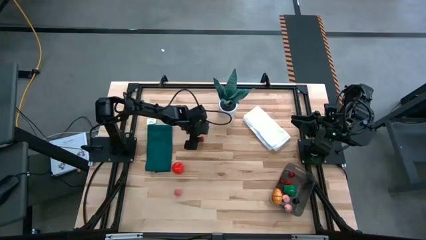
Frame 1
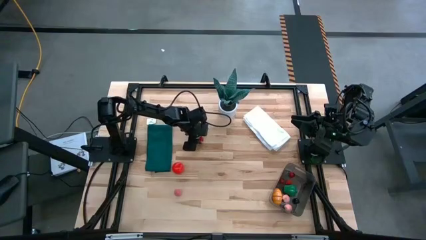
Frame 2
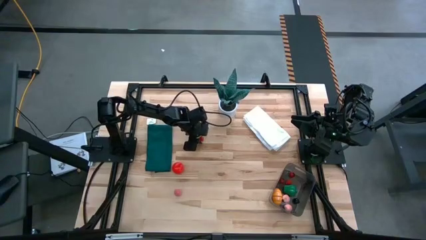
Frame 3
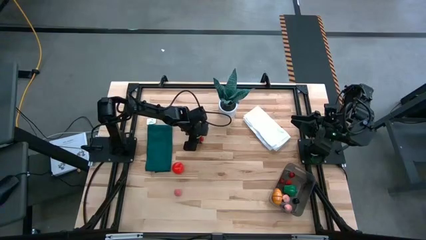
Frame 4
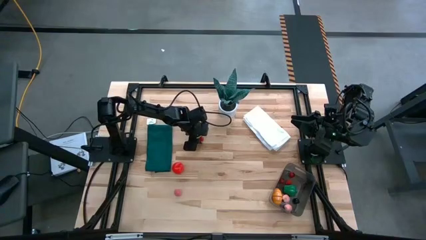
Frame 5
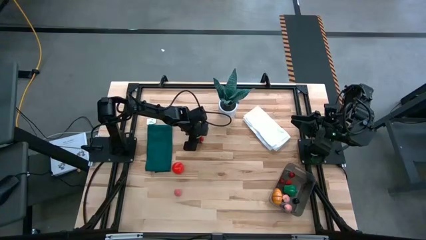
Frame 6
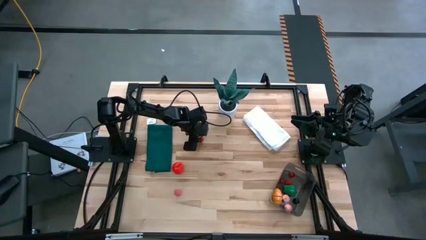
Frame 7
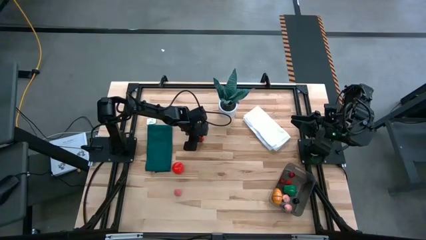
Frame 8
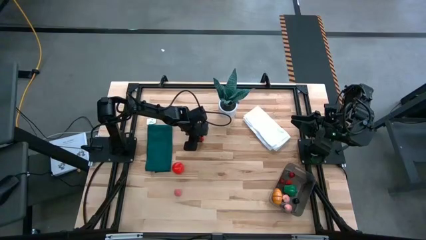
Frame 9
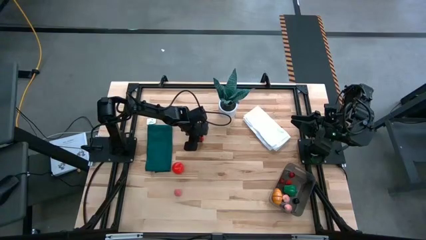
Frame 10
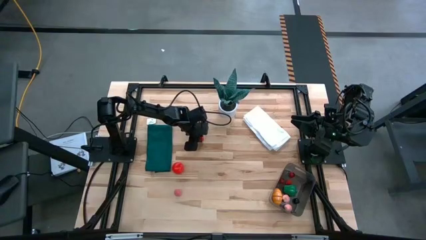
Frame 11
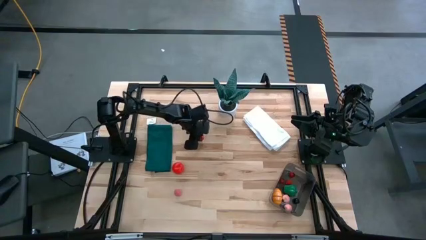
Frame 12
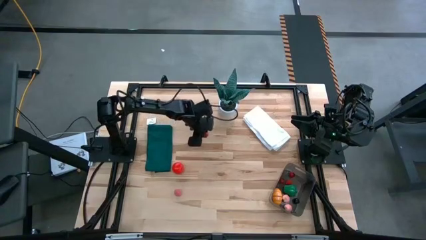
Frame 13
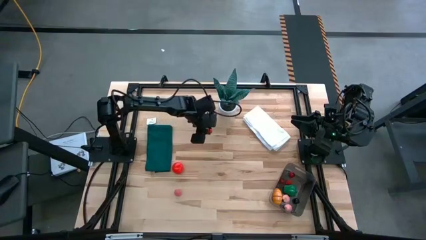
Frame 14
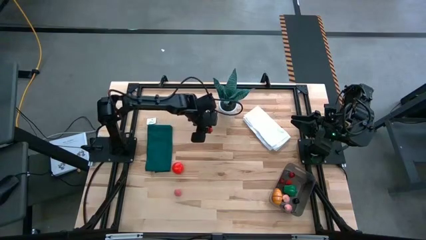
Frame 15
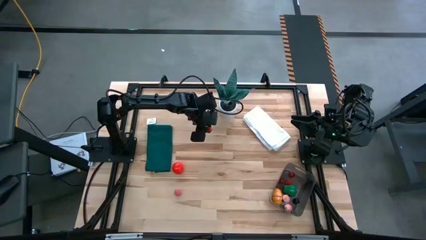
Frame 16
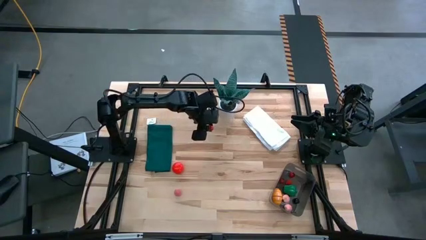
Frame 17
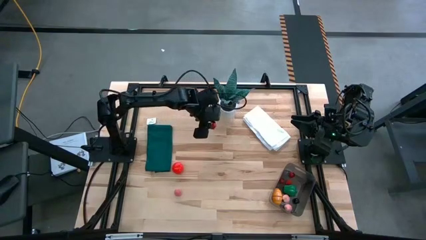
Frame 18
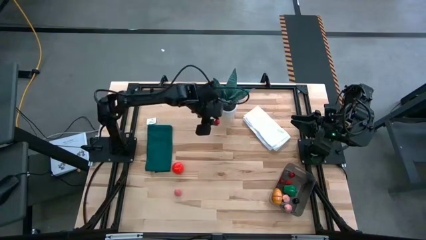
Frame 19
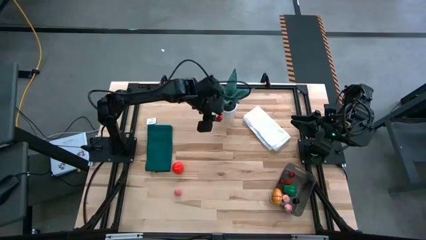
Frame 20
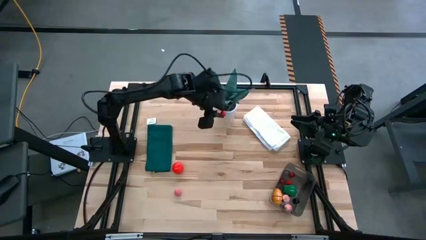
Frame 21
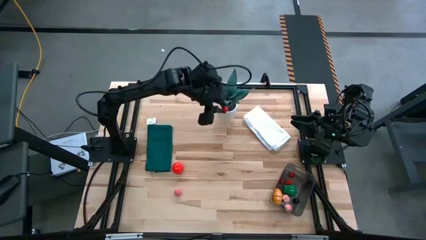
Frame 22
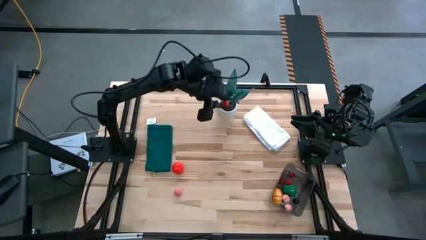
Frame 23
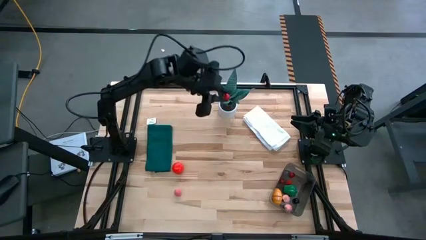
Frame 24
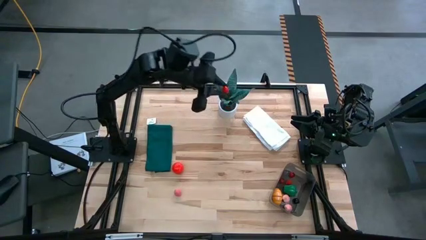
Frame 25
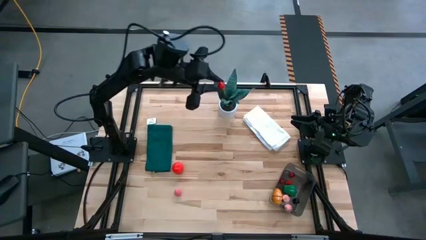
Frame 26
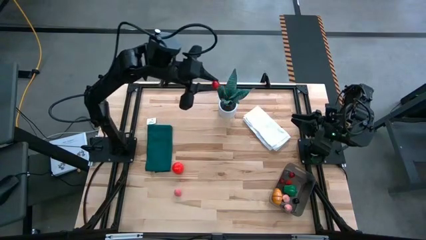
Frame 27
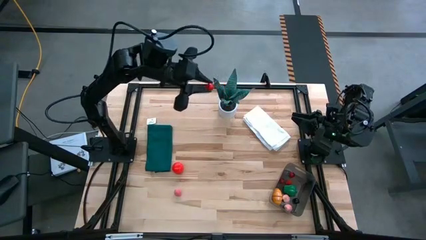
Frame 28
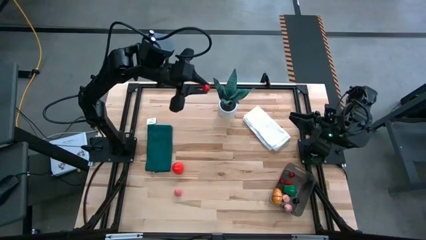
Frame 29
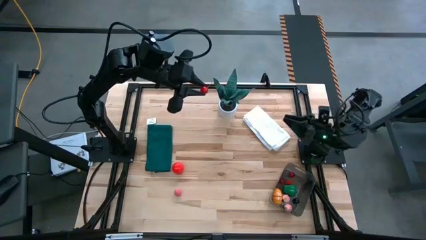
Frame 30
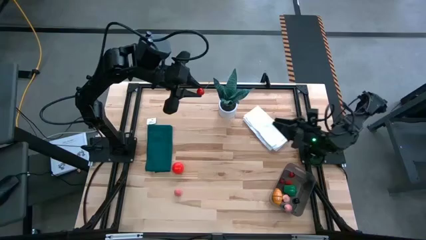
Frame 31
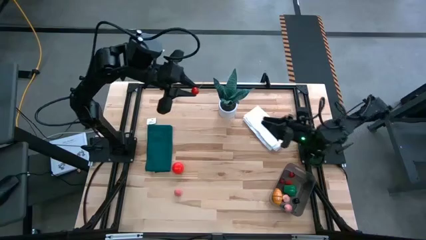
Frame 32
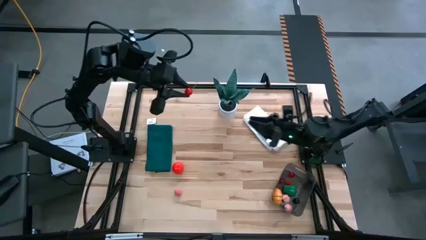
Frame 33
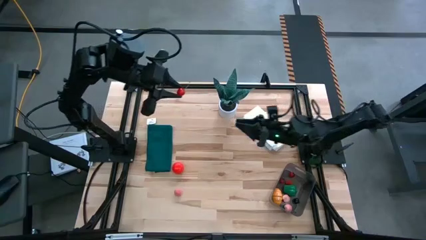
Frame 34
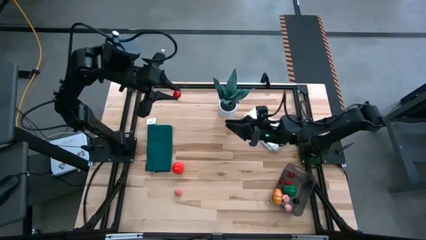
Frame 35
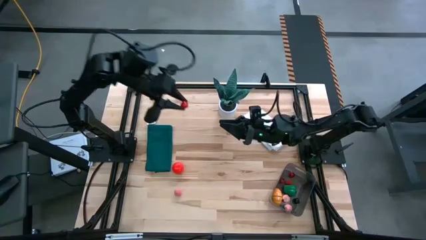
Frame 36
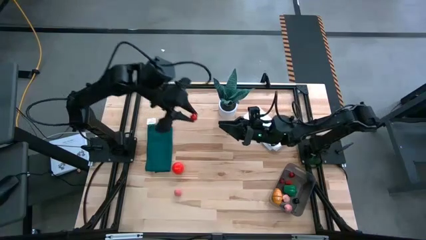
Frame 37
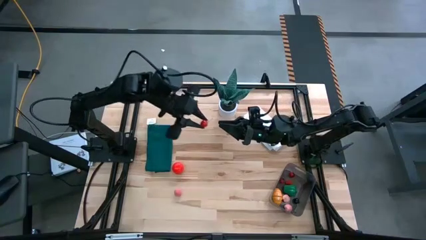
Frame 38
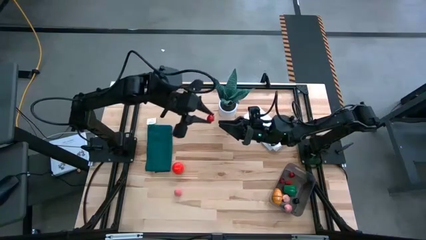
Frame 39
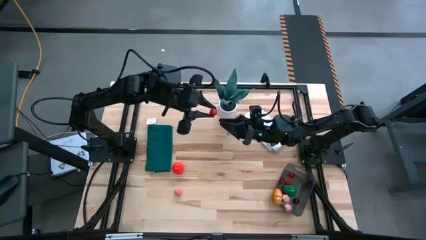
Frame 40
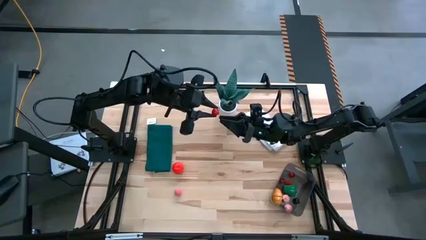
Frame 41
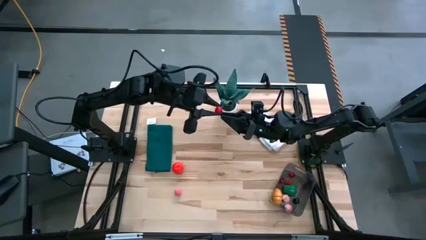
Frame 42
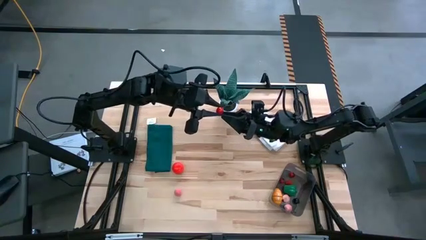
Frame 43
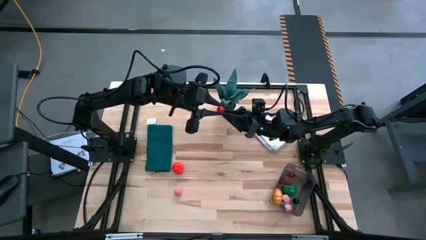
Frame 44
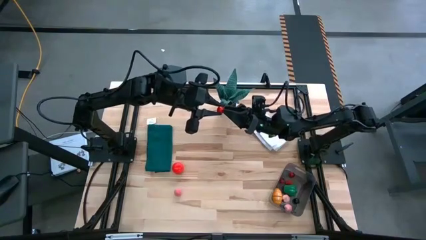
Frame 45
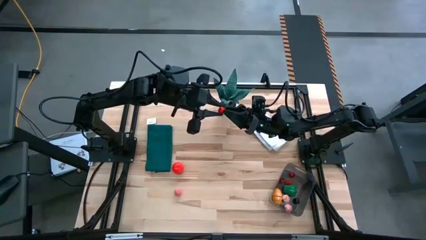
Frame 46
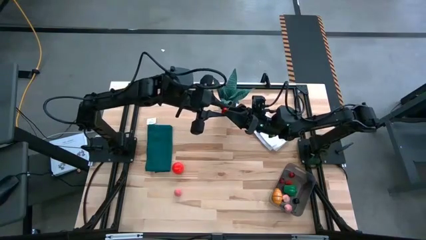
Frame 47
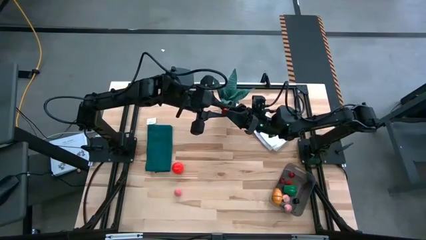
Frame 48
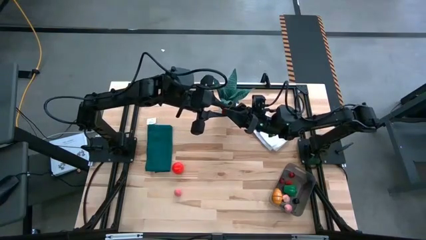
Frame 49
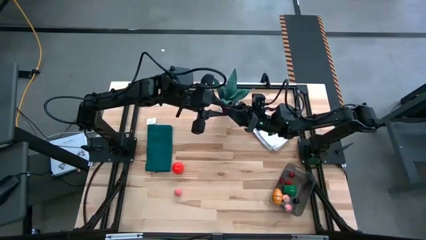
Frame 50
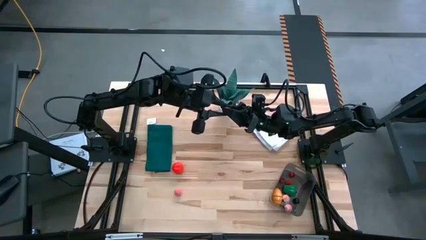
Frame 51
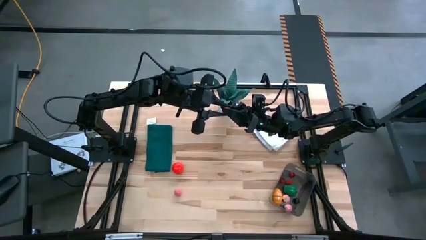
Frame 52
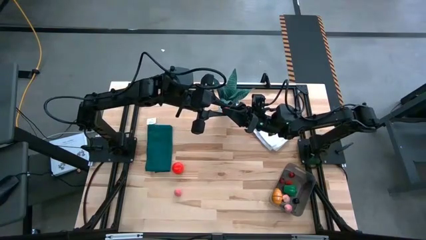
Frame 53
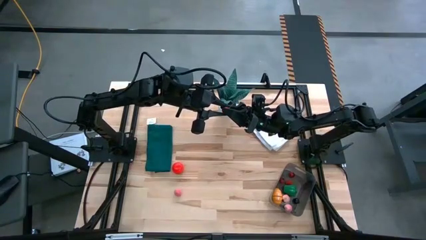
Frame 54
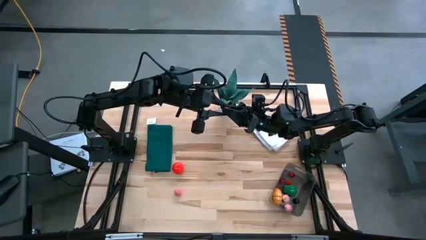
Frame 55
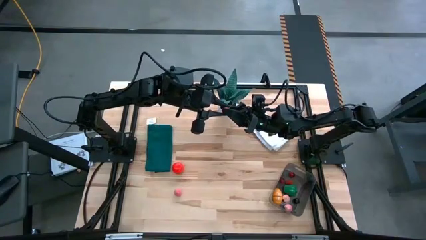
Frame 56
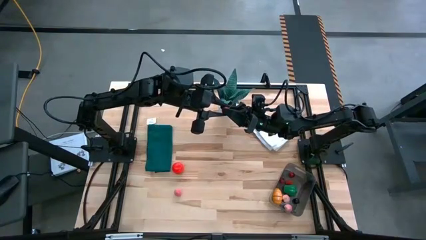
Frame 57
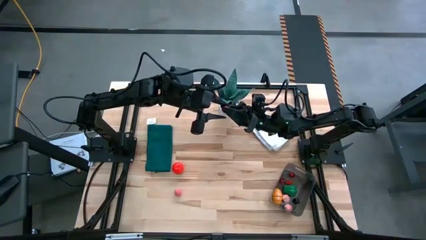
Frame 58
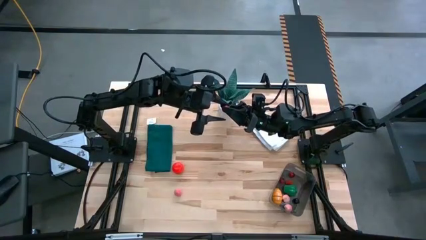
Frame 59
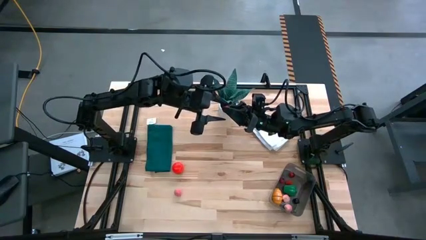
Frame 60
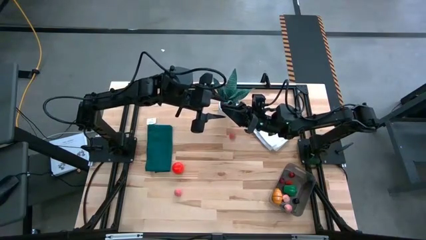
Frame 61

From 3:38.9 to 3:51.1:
Task: Pick and placing Produce into tupperware
Put the red cherry into the black bin

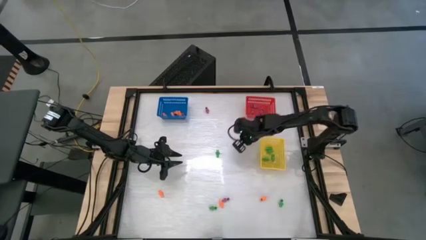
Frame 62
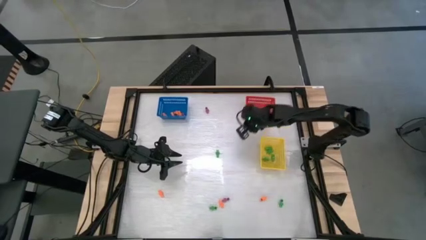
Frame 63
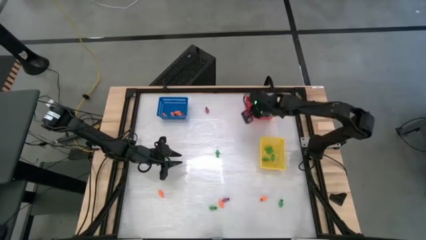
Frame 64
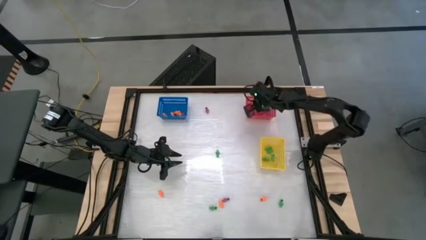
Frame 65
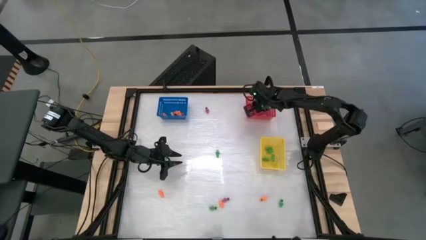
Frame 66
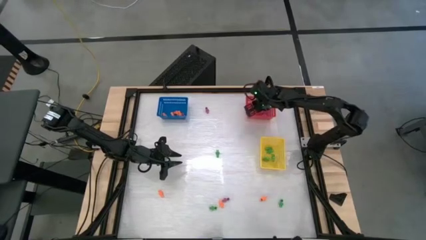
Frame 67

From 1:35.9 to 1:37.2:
Task: Sort Halloween decoration
Put the purple skeleton toy into the red bin

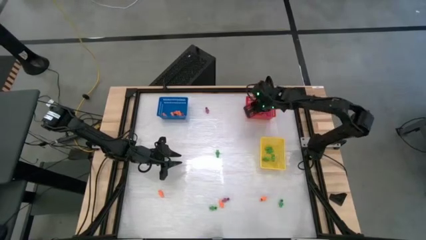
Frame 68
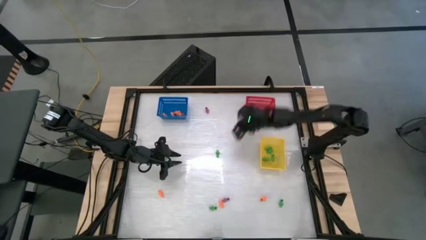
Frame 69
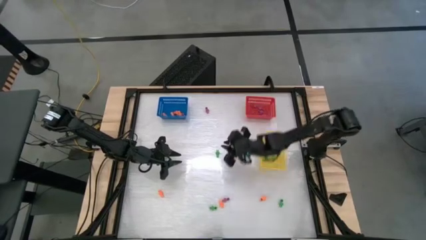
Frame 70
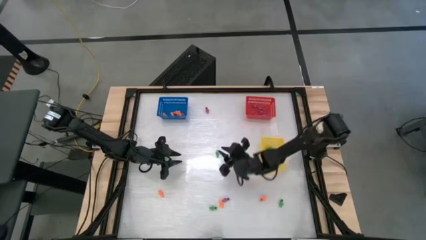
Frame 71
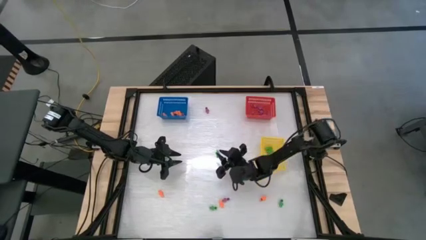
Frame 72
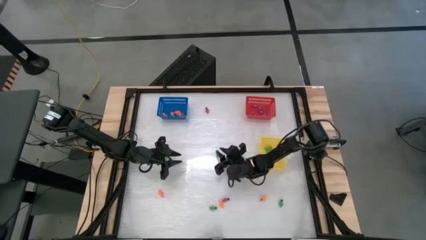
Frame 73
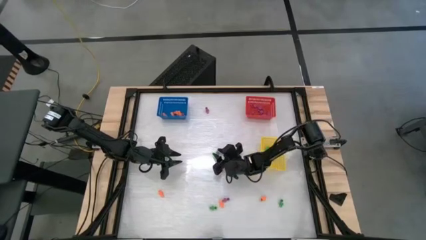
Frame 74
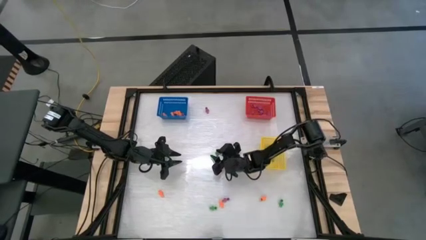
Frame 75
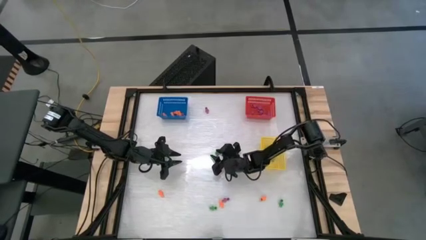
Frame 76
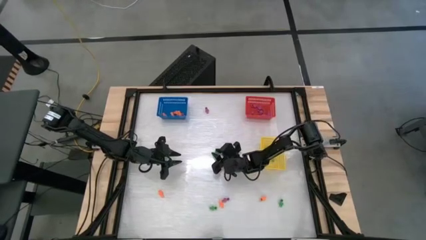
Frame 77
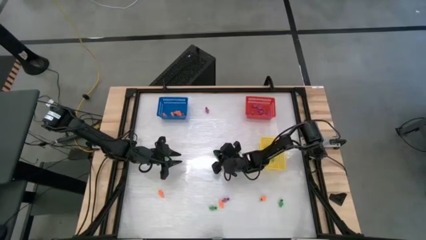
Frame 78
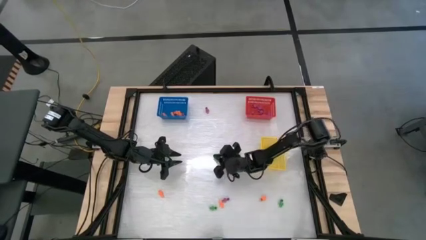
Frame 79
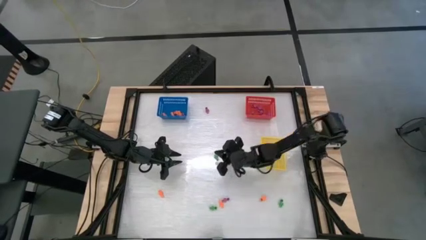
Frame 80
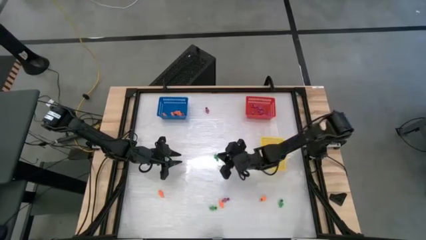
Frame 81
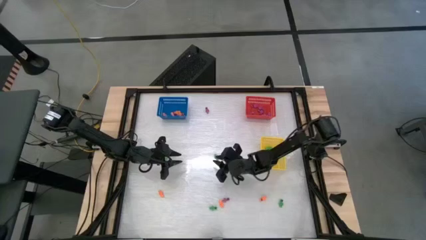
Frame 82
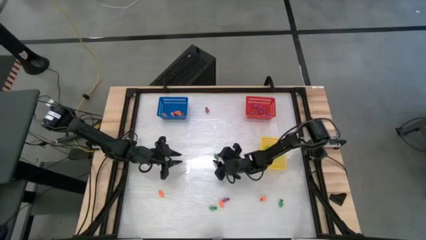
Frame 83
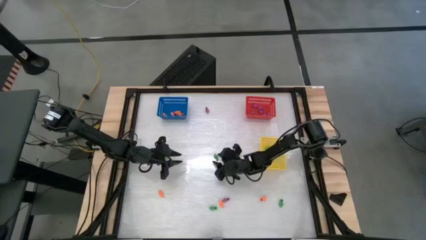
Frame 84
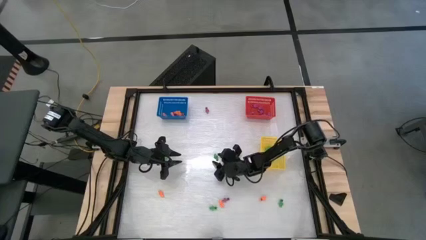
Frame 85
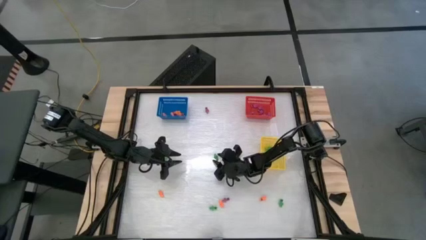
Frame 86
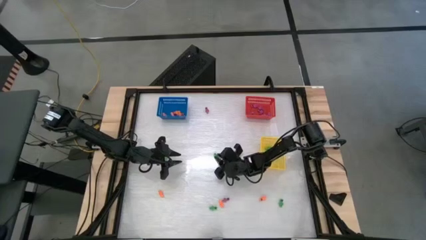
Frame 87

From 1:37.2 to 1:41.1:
Put the green skeleton toy into the red bin

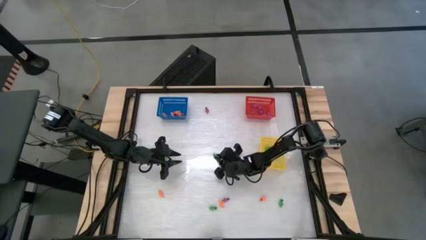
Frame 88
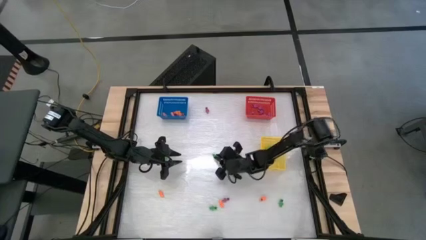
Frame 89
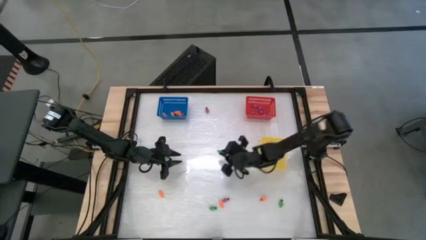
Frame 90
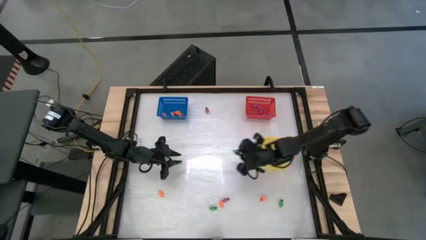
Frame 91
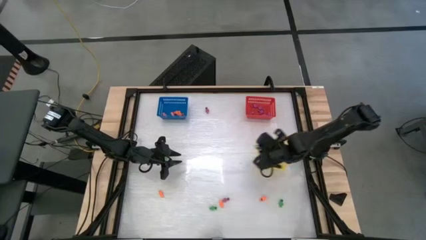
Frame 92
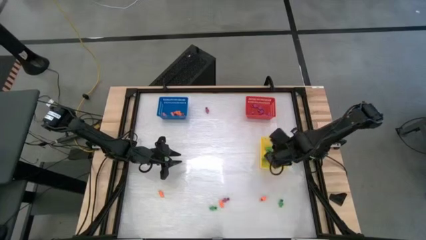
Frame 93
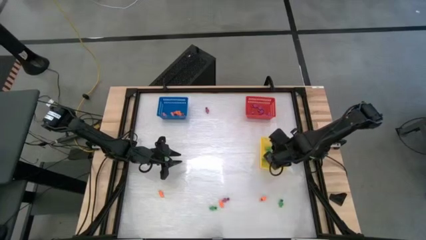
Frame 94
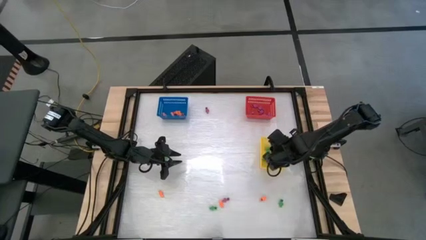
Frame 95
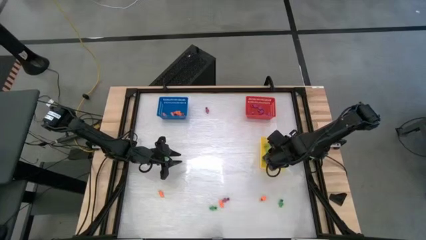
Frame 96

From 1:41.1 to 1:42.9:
Put the green skeleton toy into the red bin
